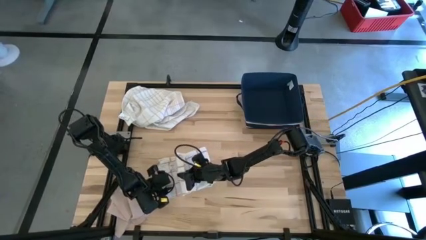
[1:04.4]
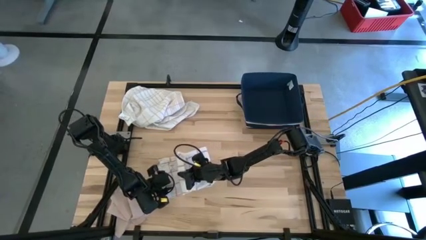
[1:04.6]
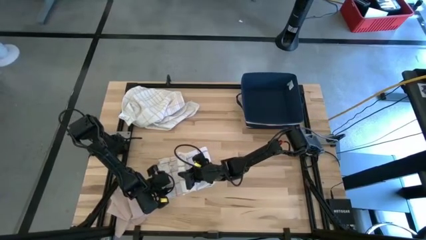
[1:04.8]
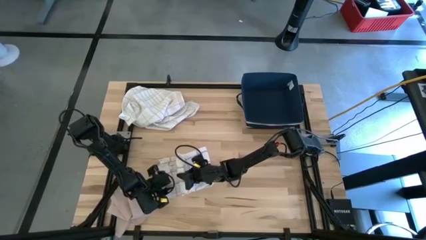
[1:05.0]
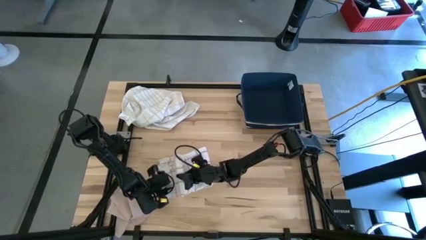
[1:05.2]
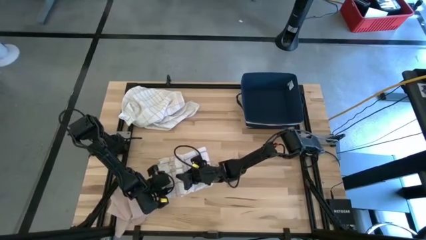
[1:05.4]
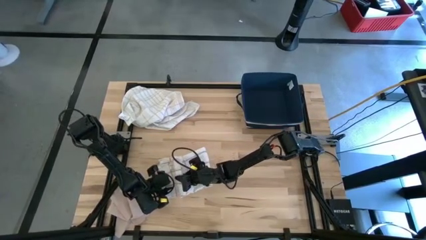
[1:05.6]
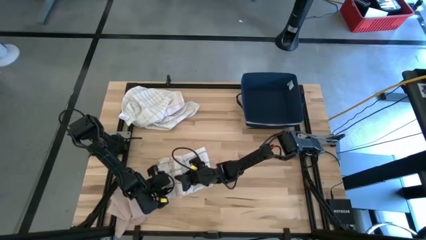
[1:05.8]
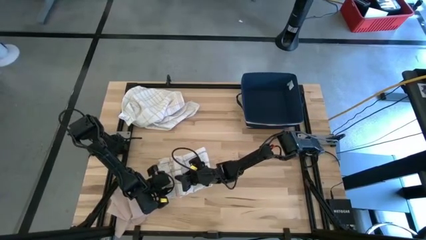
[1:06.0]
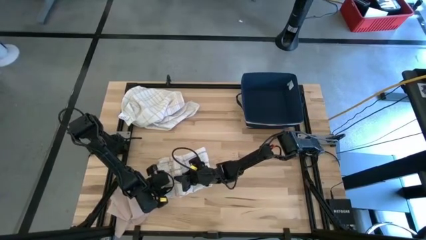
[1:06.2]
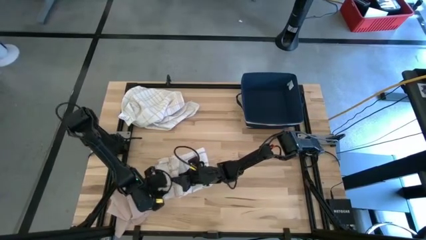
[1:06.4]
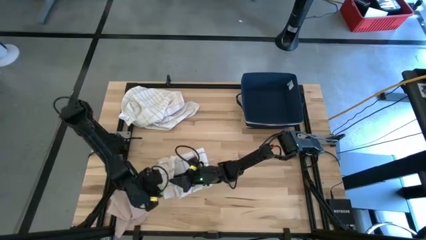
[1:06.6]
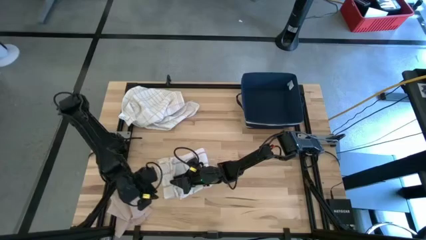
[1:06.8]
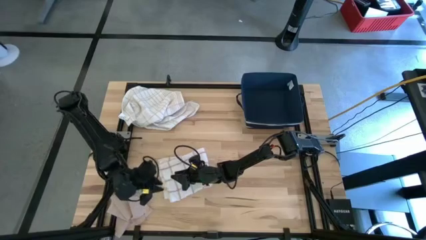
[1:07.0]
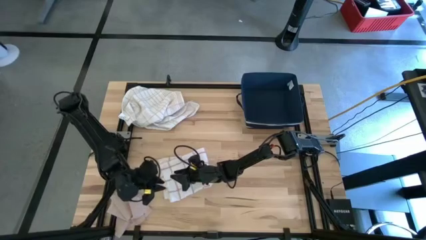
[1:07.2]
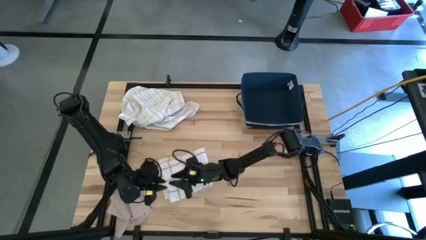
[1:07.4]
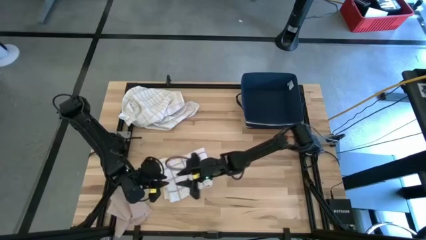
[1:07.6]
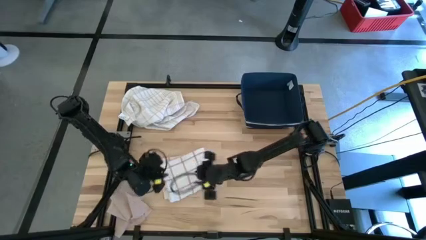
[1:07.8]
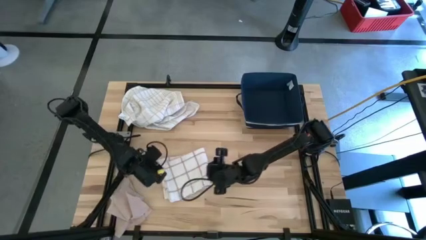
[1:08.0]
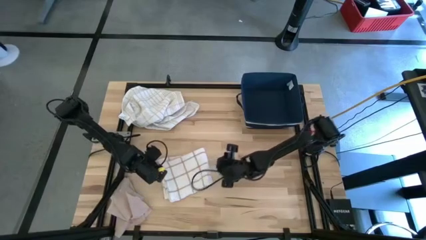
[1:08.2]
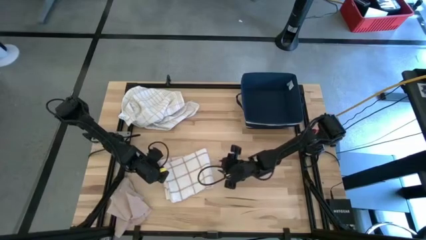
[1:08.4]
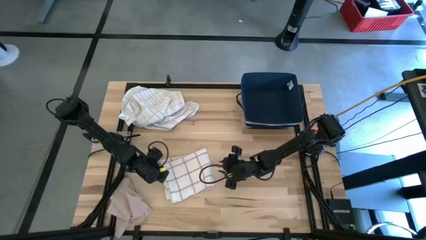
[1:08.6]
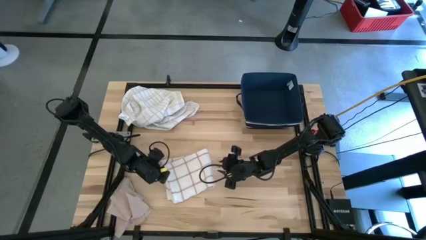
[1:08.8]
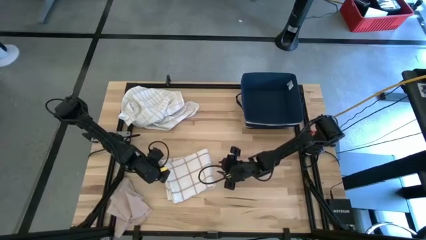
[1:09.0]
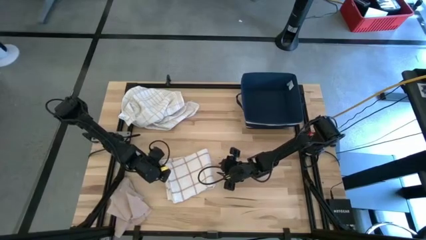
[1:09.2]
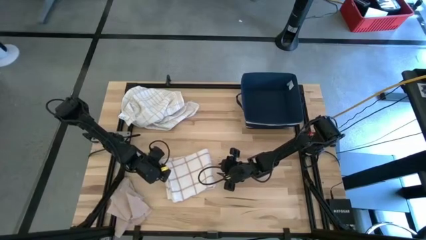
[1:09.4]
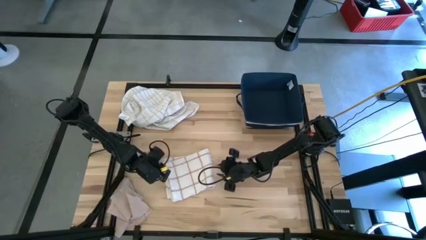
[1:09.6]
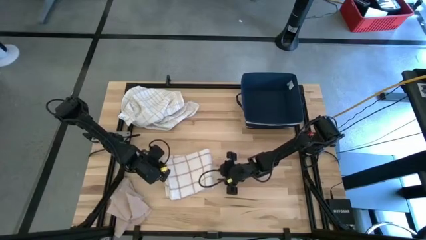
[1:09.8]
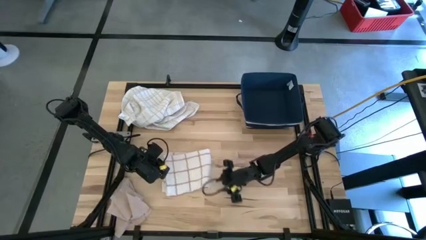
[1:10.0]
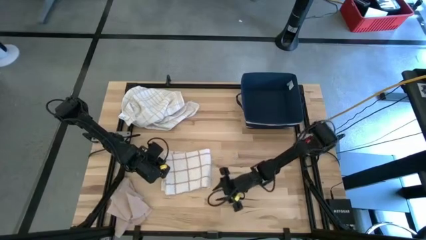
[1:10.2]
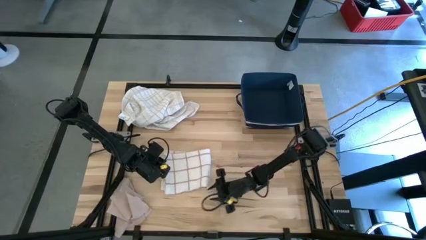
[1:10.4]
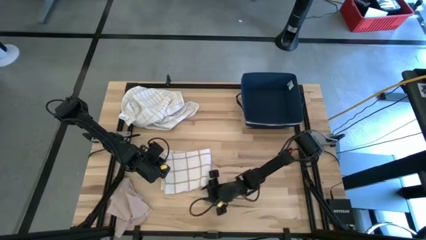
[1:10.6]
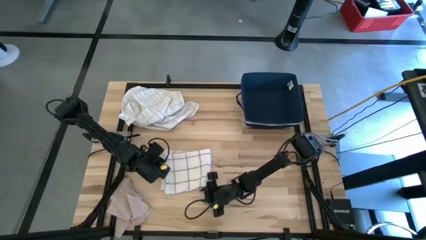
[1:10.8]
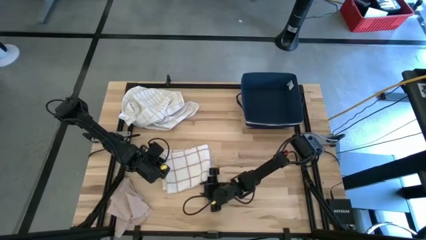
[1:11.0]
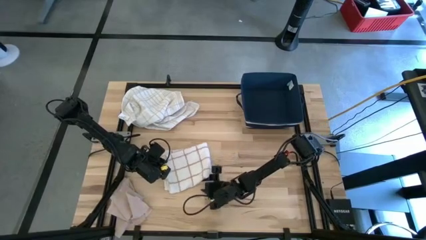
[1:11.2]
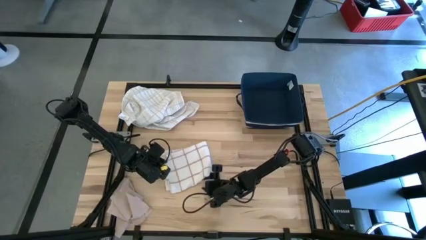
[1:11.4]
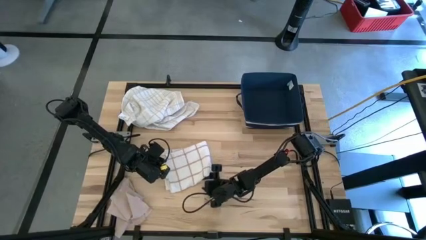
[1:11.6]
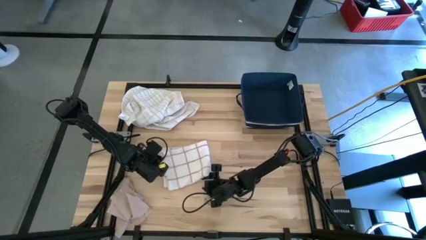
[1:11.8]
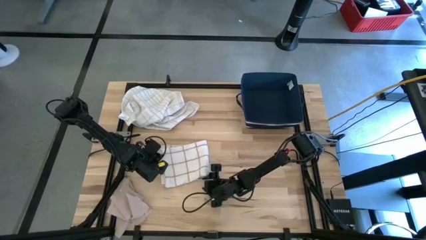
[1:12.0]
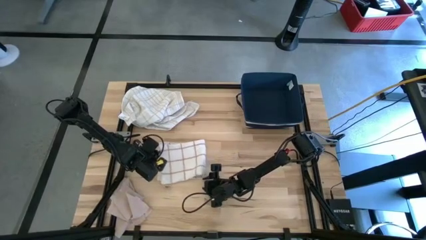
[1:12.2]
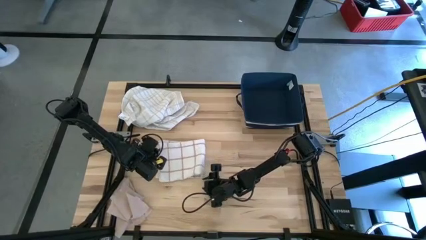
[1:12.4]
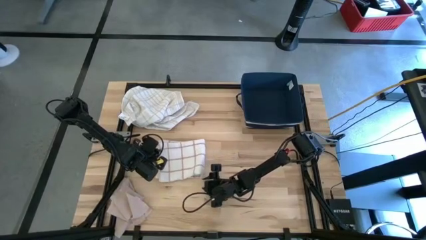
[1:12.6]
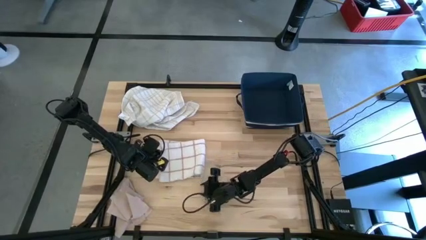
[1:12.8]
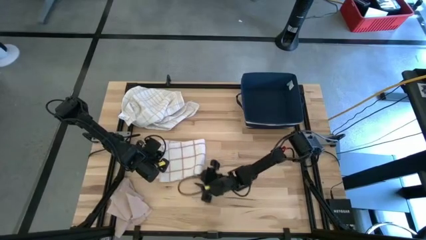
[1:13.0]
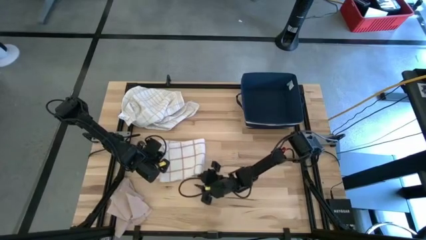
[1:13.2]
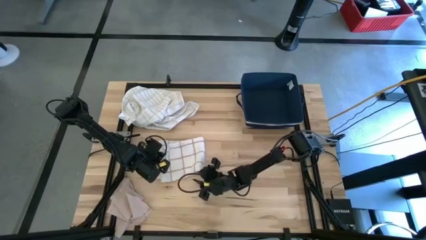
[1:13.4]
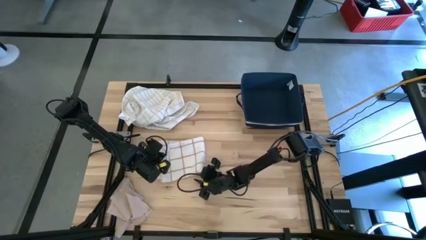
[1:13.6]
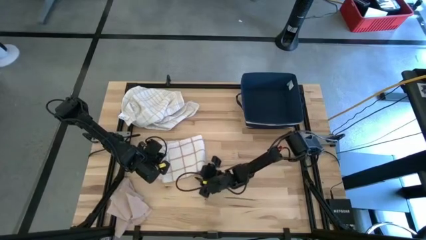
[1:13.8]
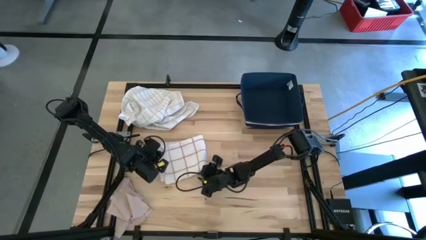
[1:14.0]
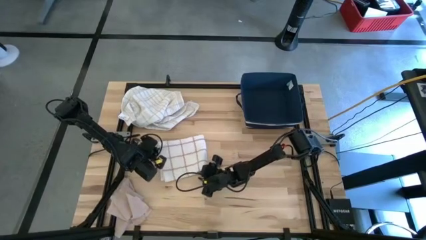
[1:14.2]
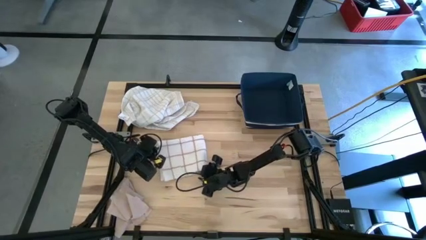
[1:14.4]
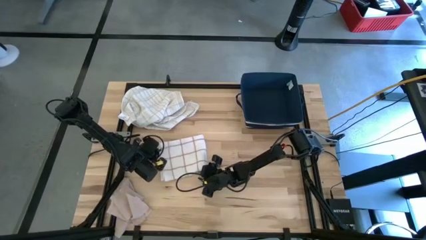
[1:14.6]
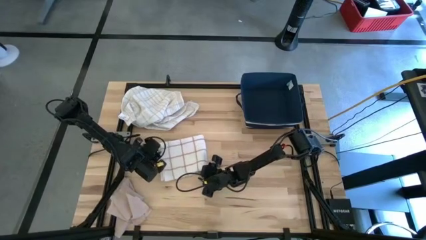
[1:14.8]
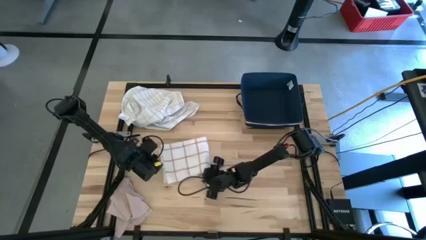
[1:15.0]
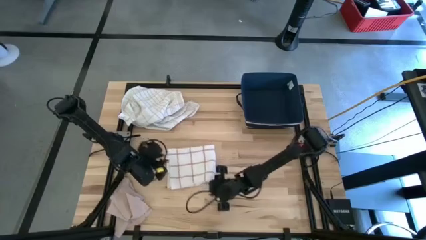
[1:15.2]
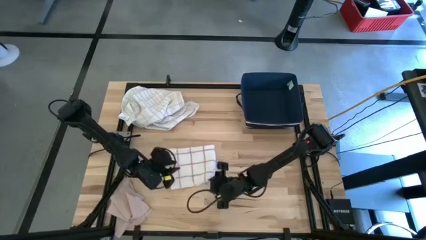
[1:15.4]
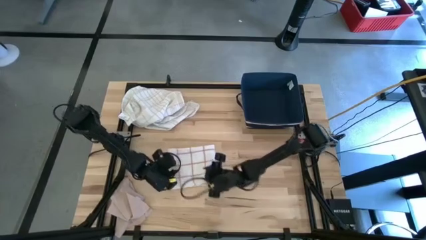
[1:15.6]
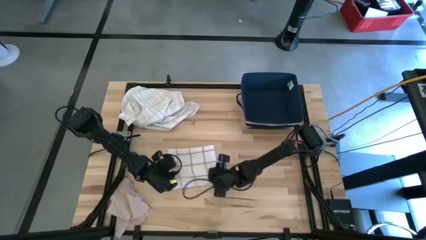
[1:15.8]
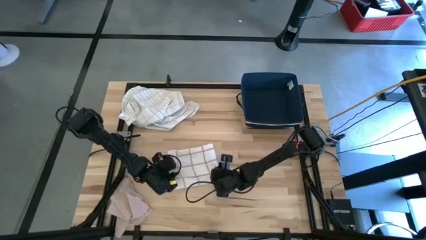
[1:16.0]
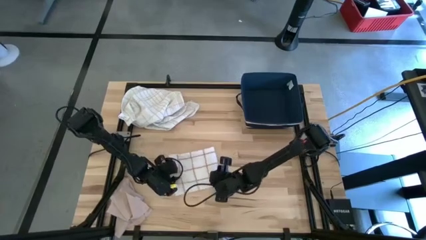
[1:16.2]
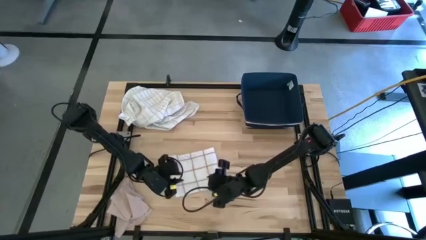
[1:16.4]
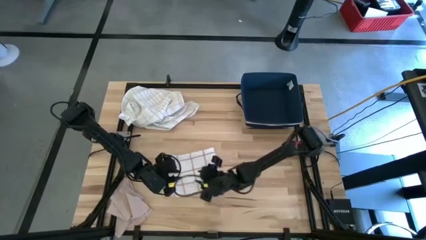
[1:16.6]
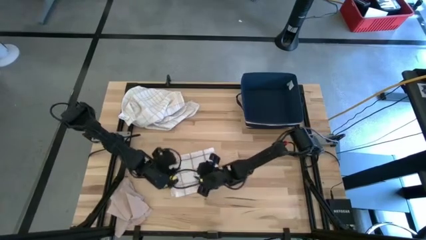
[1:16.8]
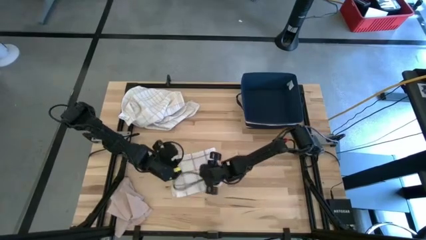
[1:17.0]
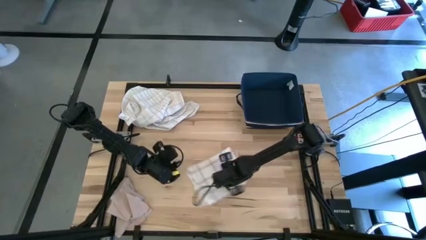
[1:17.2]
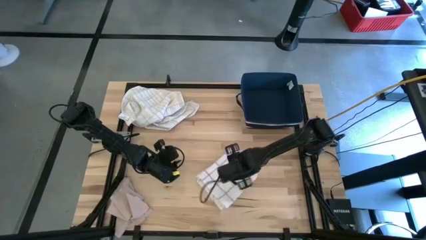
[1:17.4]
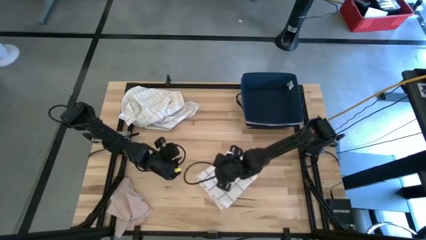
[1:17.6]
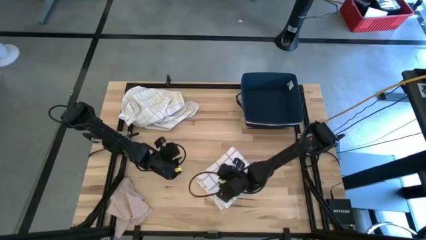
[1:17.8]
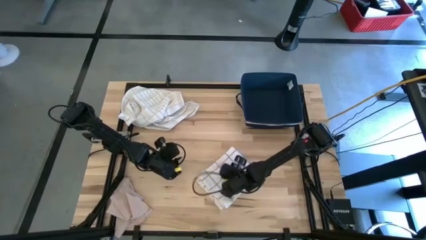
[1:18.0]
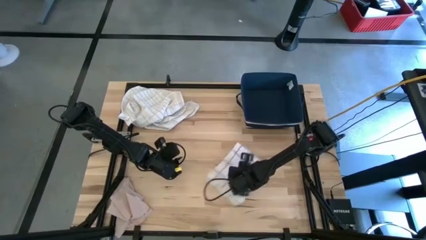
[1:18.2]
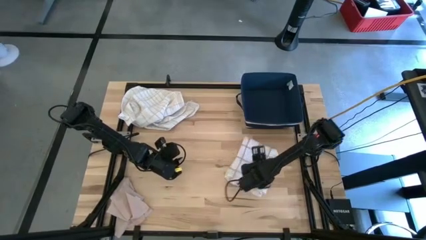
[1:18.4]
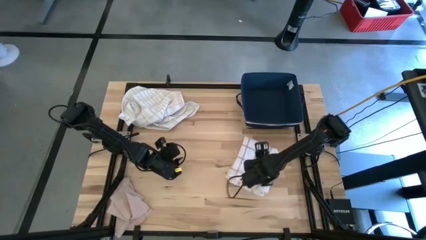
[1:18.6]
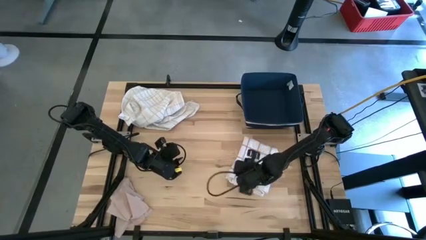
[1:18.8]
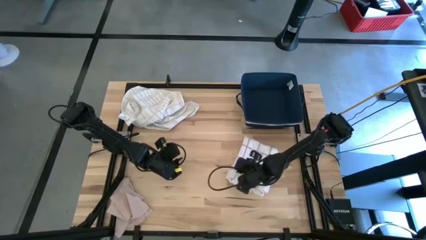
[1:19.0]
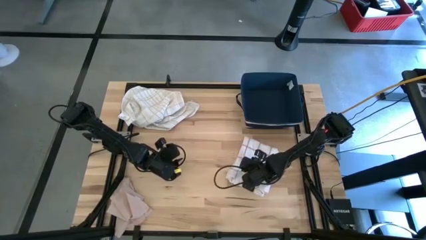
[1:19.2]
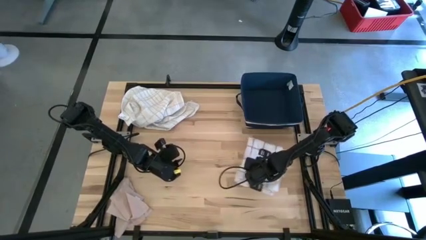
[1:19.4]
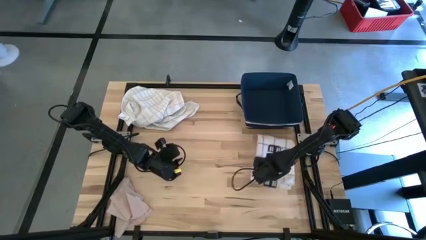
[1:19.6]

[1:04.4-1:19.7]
Task: Fold towel
Fold the white patterned towel
